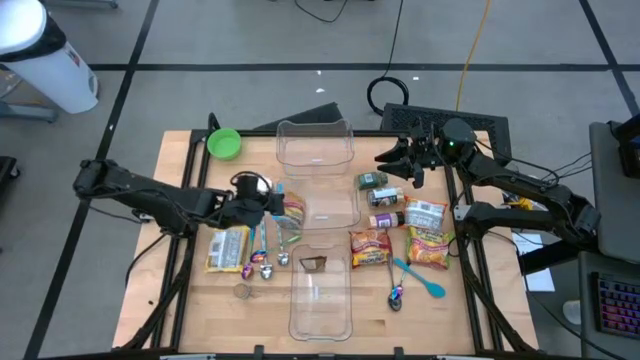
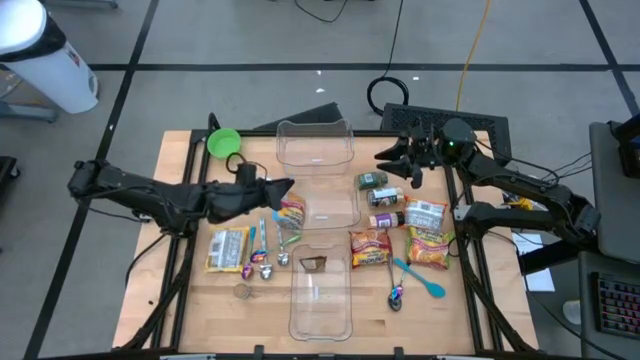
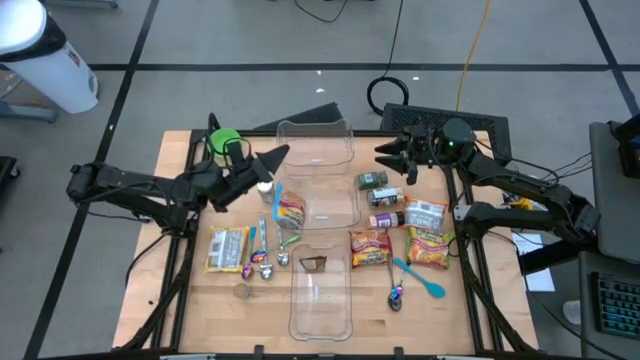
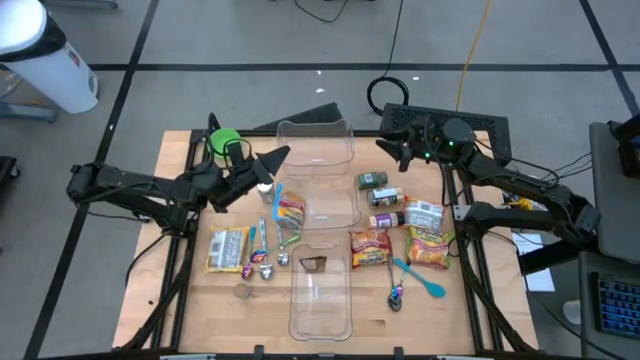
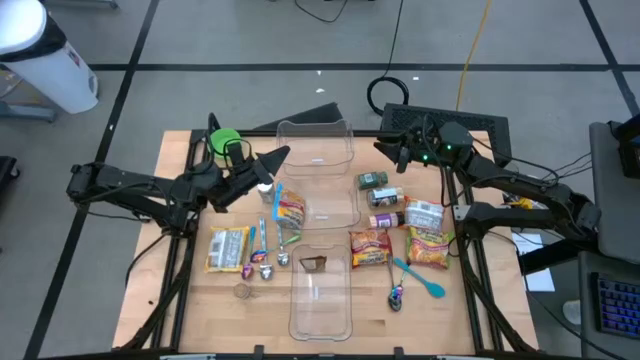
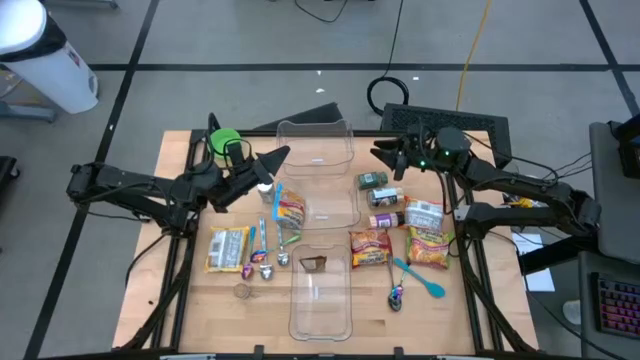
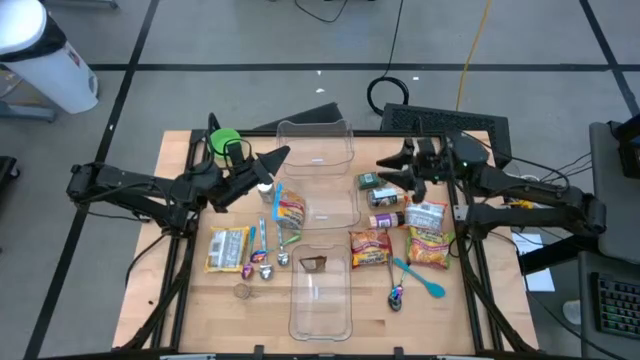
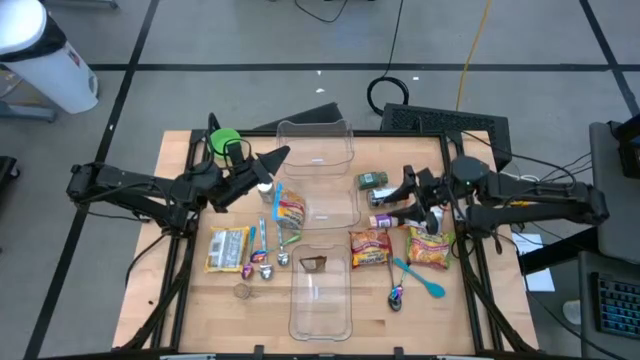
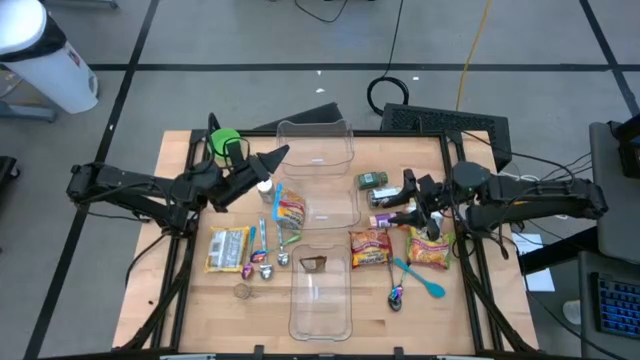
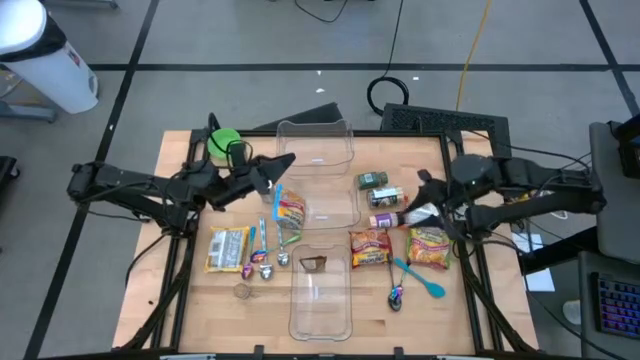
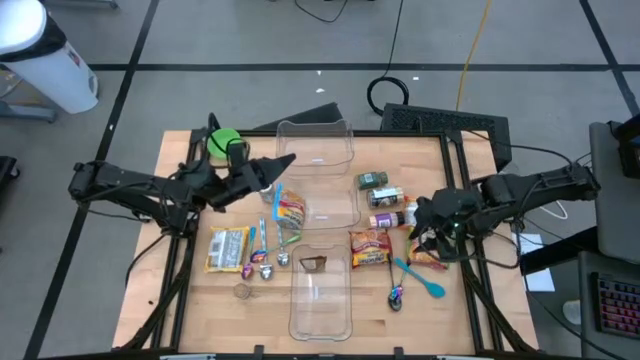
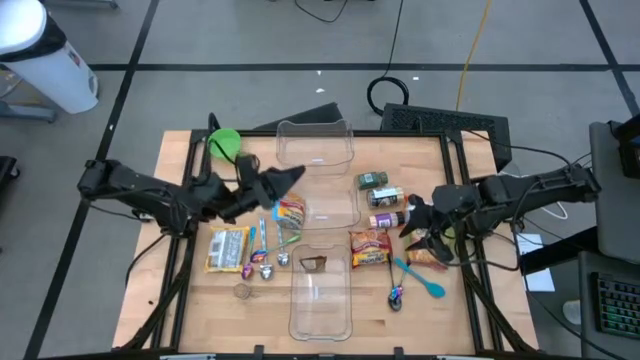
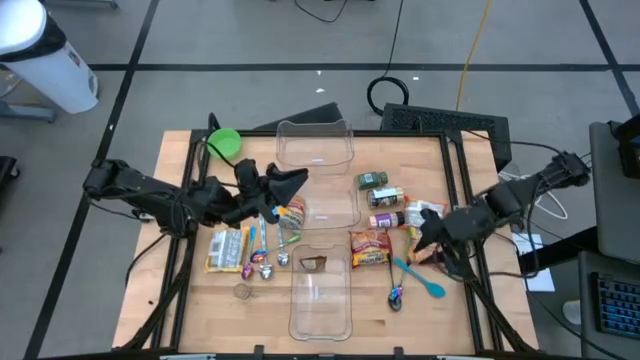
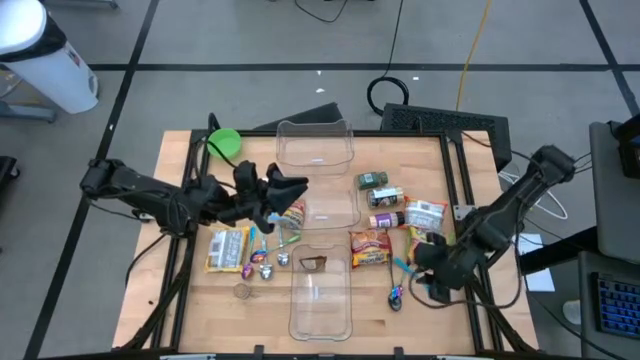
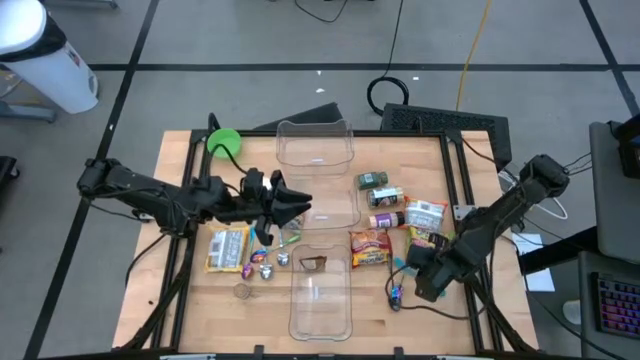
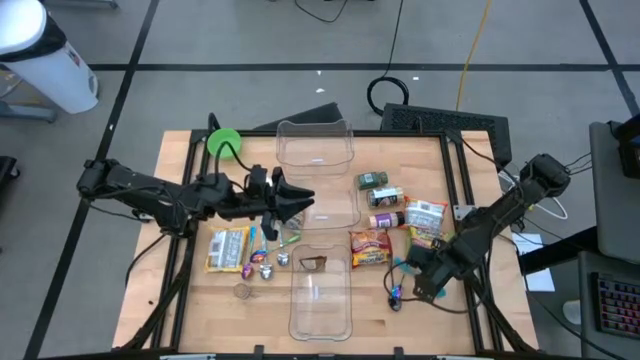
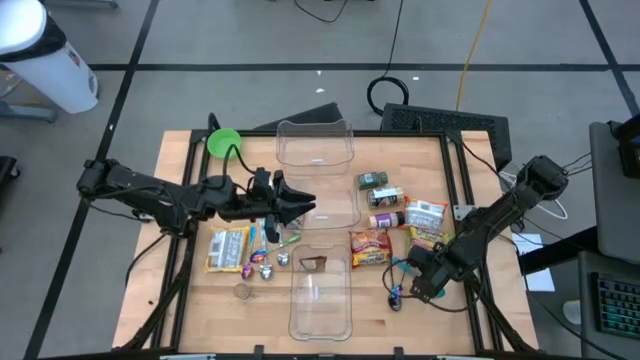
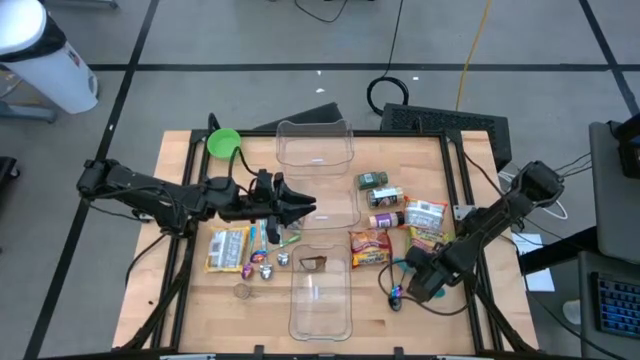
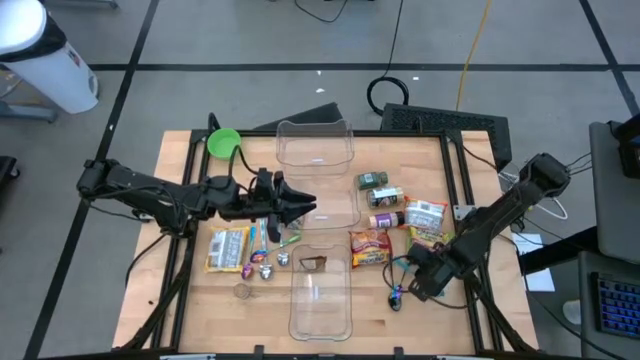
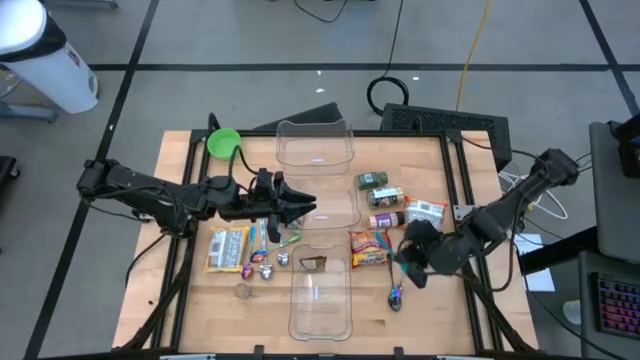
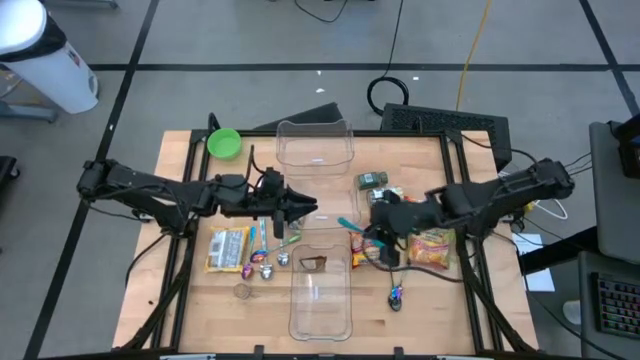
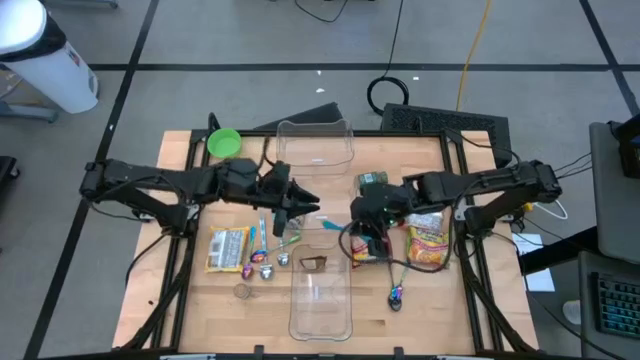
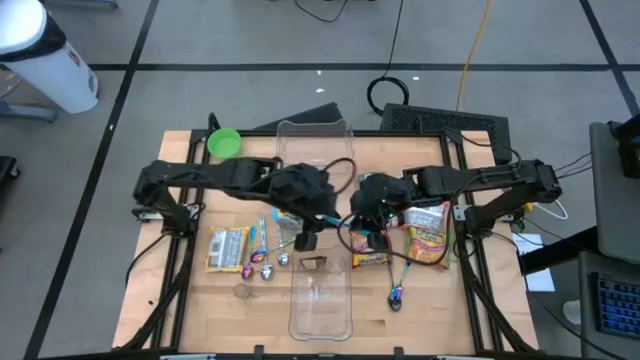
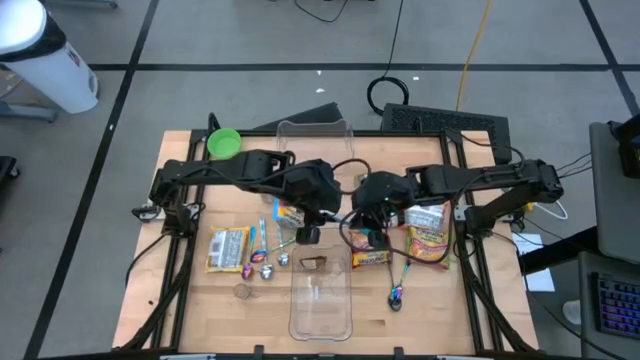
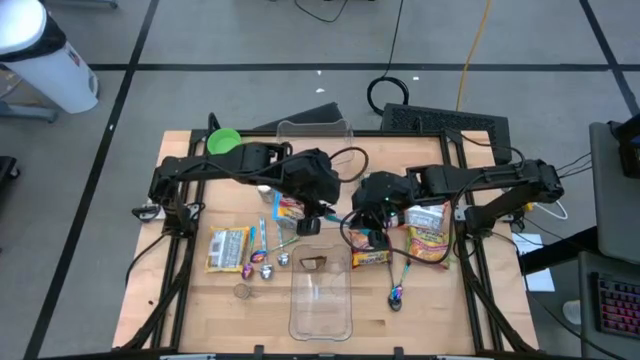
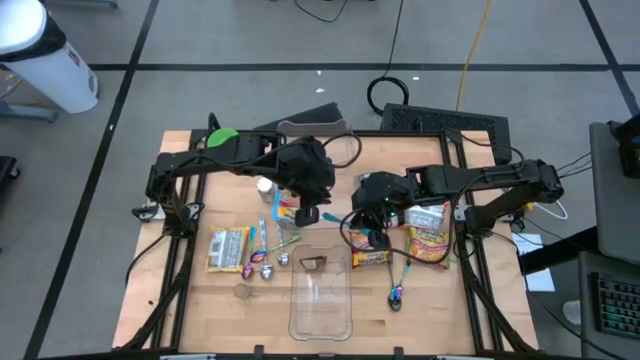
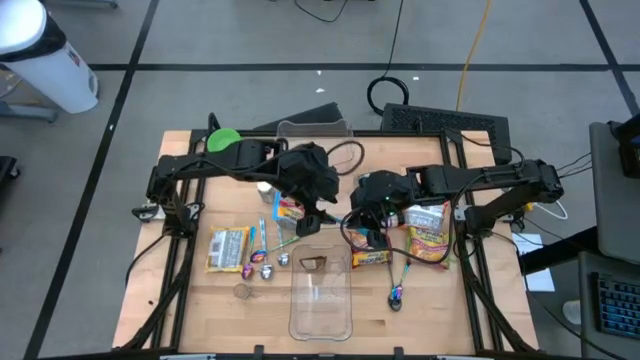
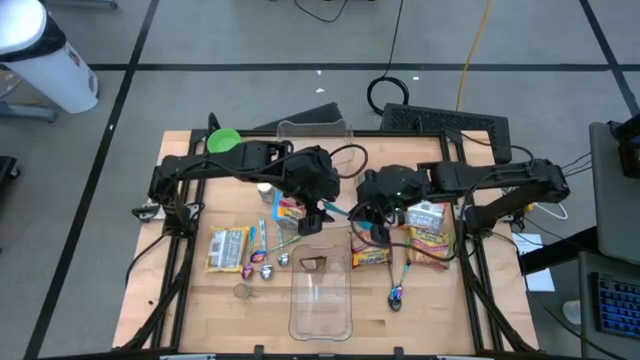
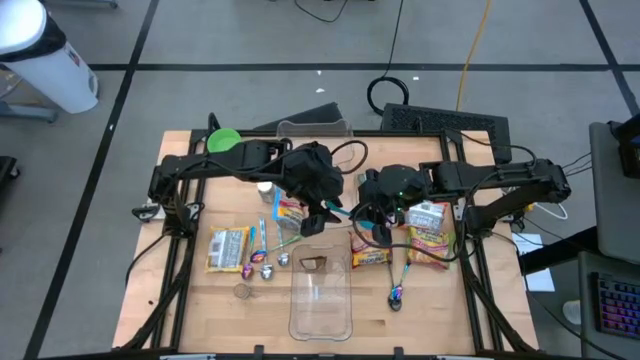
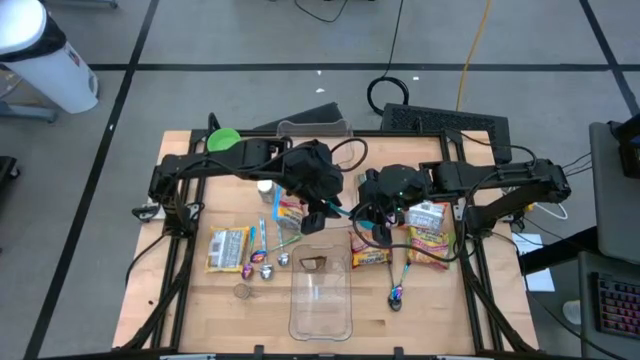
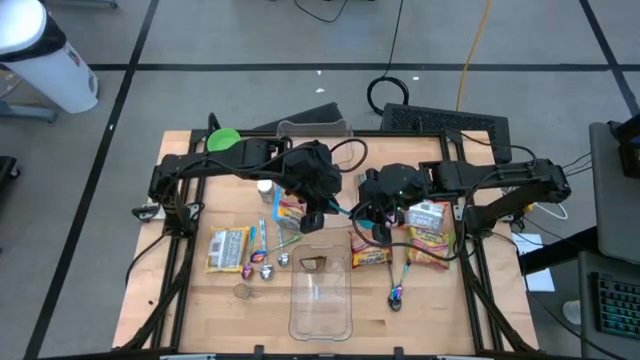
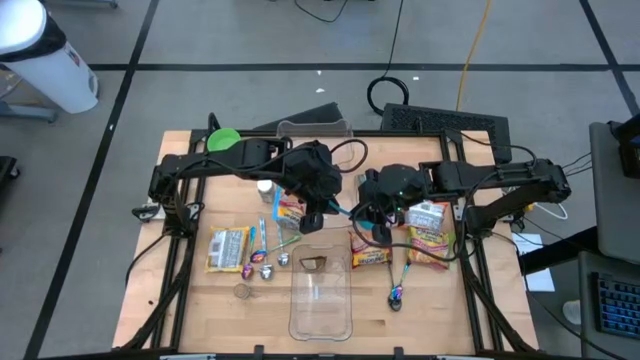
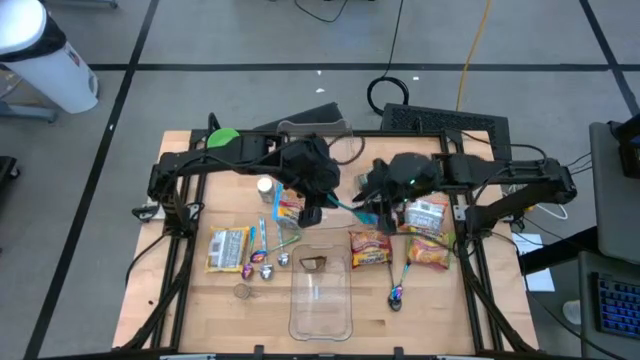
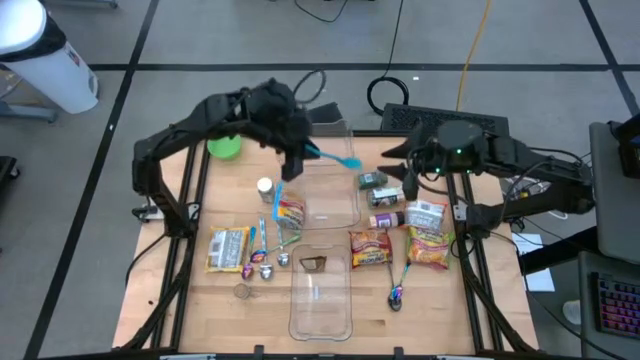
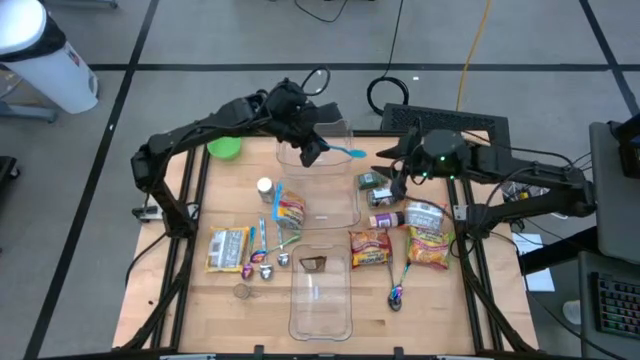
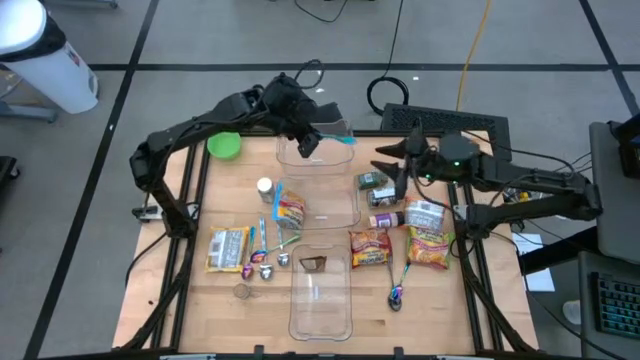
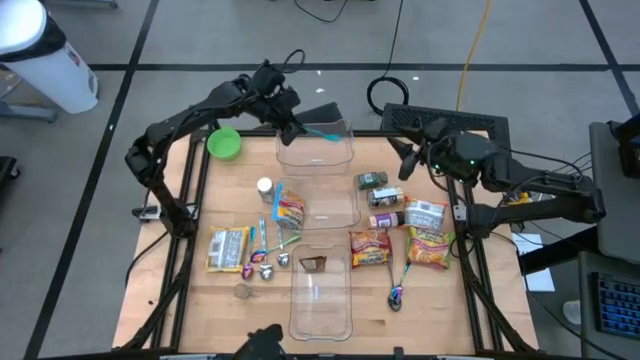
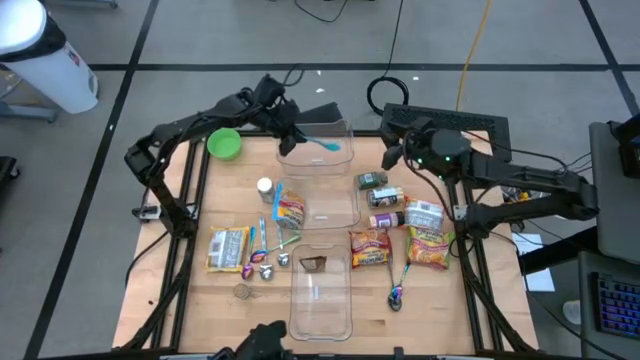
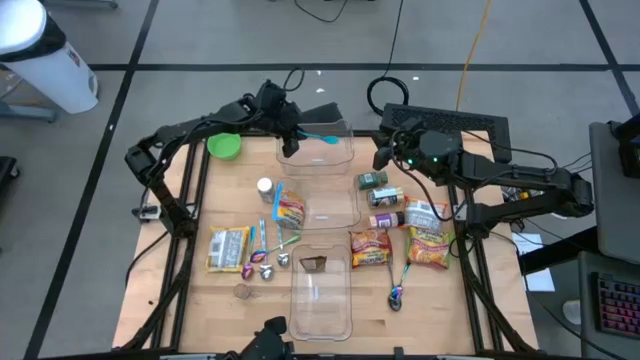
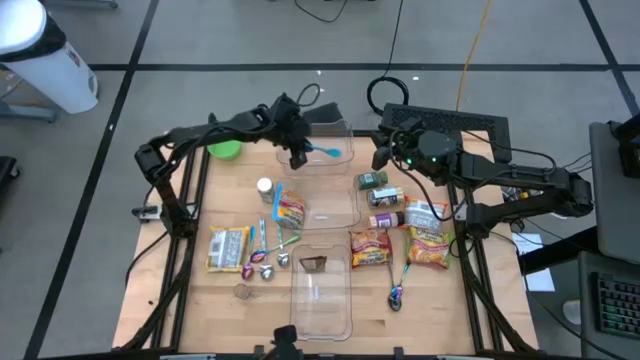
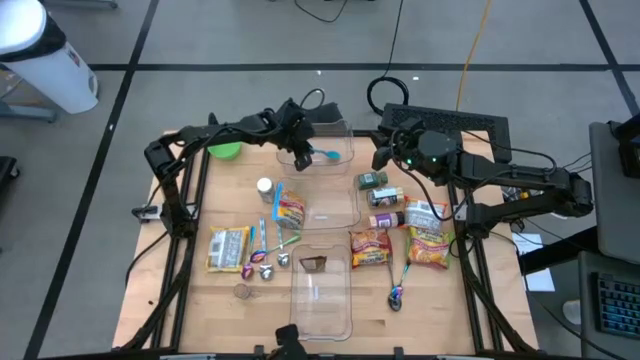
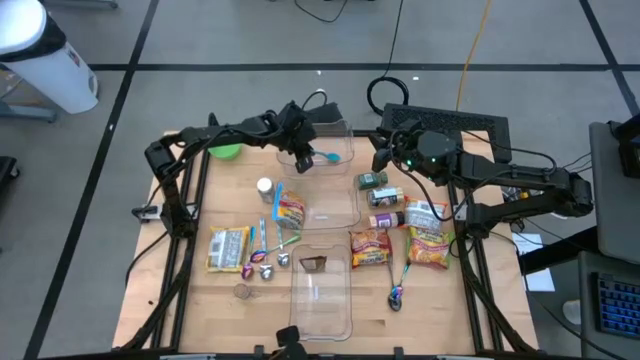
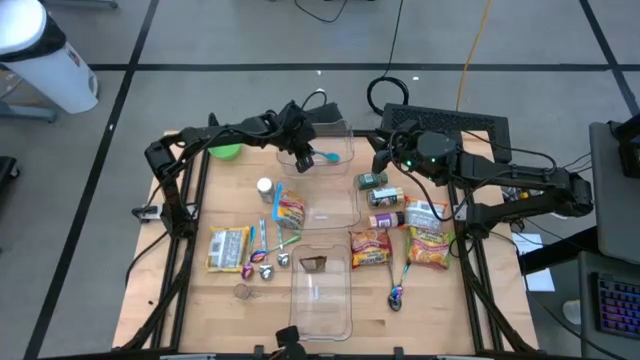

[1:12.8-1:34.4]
Task: Pick & Place Food Item
Put the blue baby spoon into the top transparent bin
